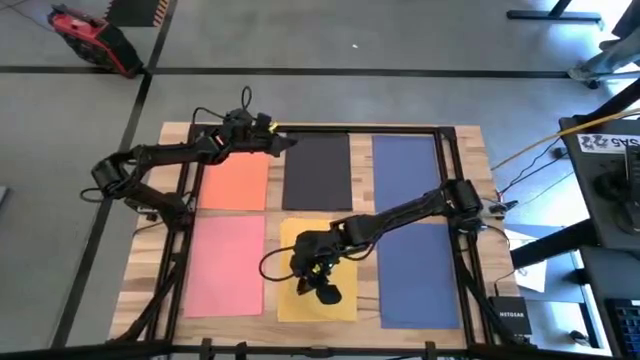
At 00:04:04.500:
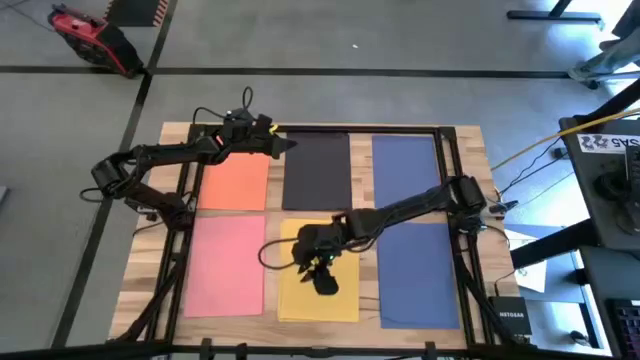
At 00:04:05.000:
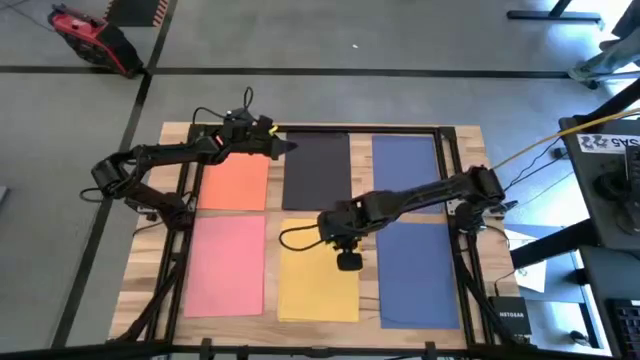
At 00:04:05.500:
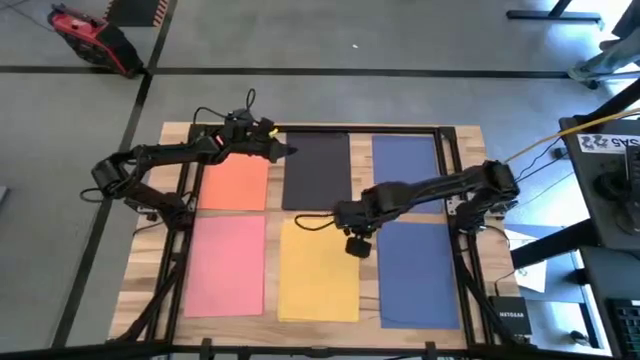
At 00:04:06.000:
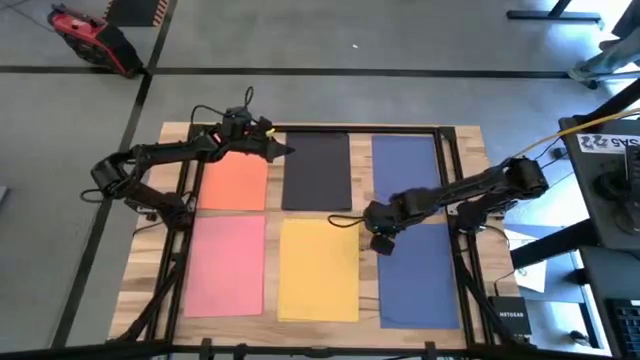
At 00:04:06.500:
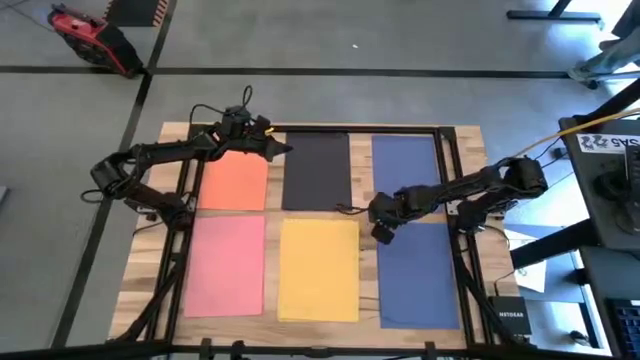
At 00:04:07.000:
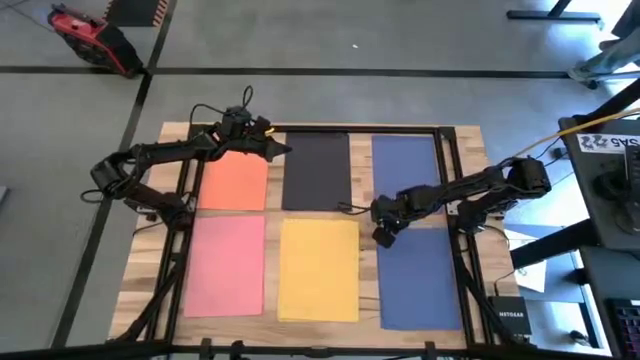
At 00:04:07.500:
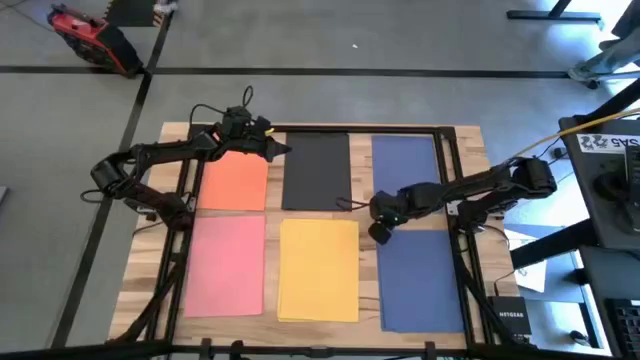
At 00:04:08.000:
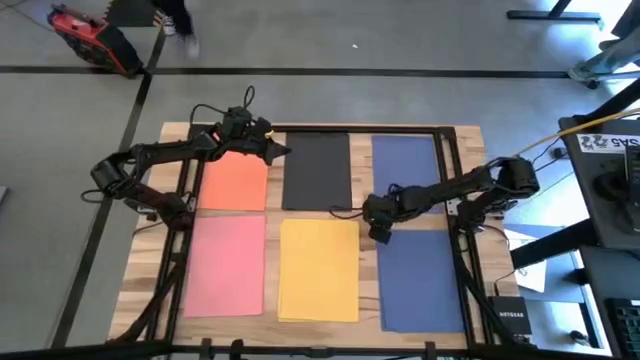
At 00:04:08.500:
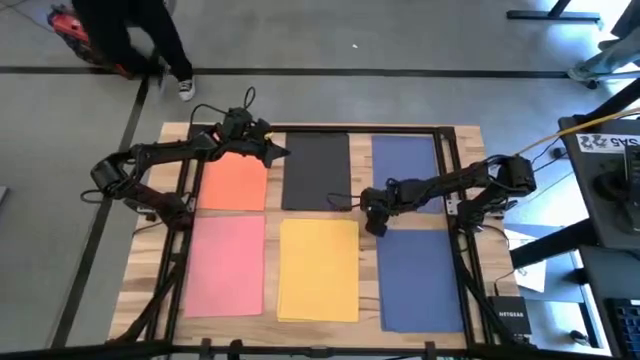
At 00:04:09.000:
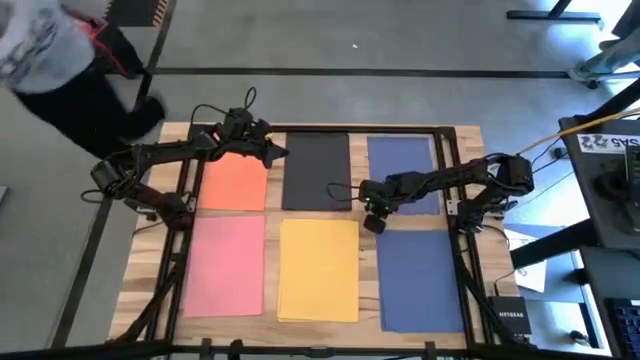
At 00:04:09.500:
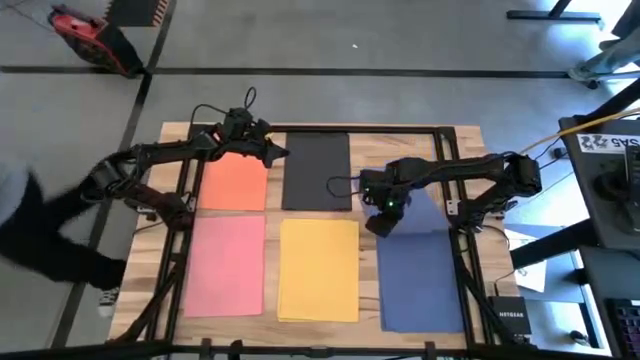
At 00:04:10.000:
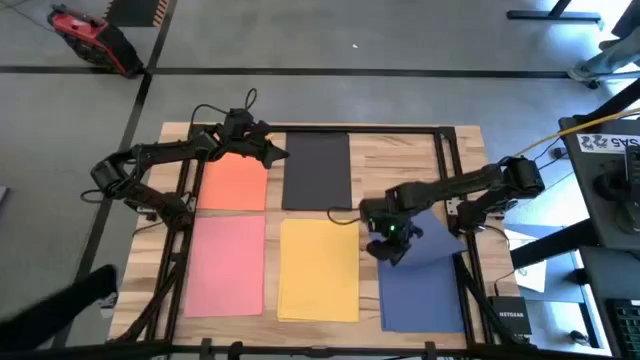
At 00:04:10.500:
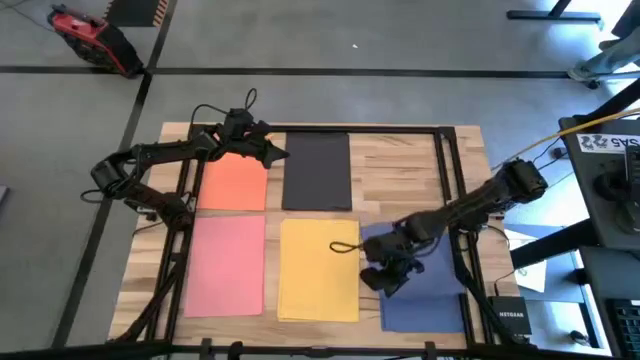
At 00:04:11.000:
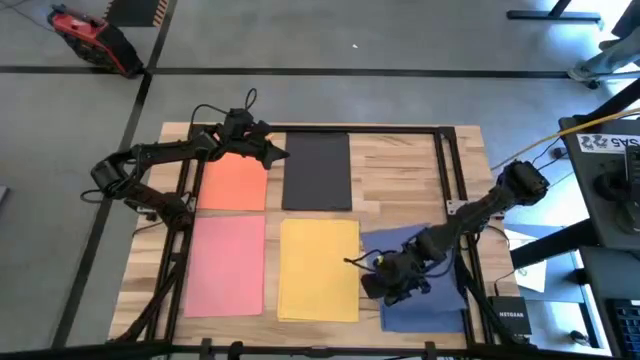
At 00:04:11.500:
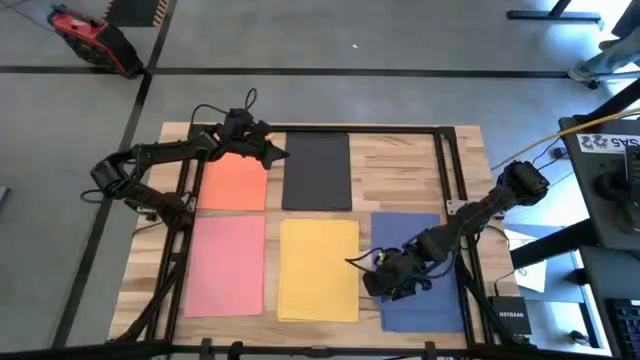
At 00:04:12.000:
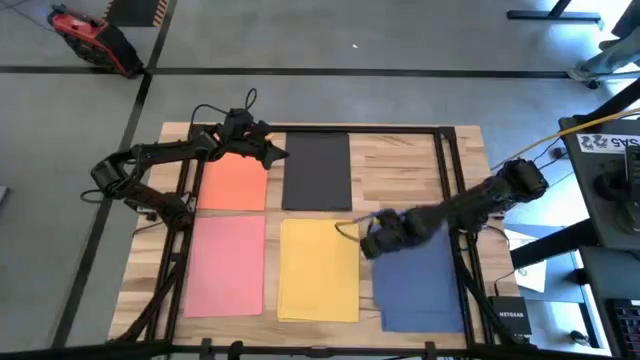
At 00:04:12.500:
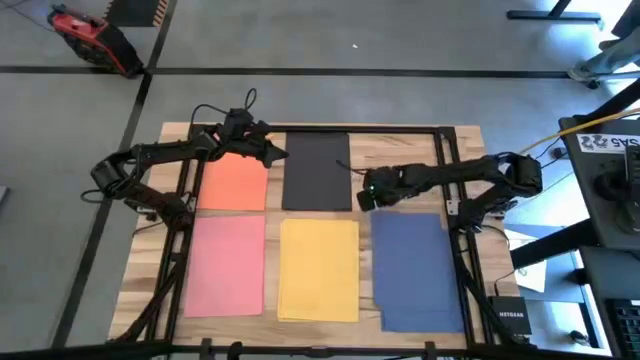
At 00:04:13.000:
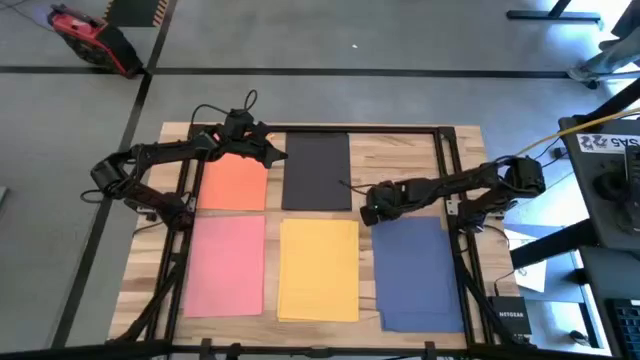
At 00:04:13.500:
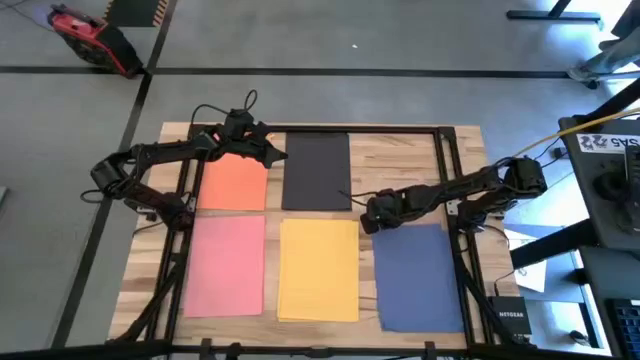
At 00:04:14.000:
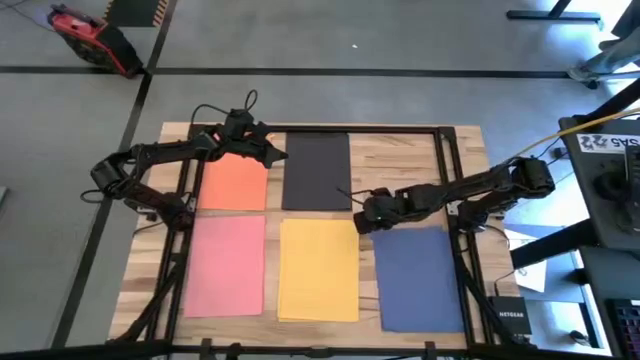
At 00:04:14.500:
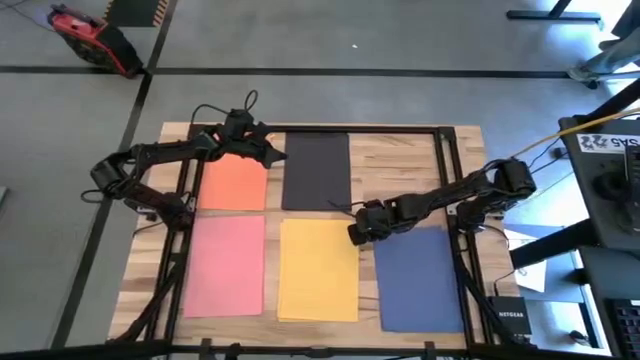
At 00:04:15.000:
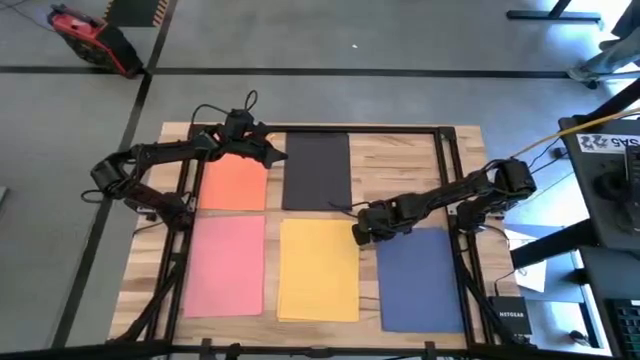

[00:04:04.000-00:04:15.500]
Task: Organize paper
Stack the blue color paper on top of the other blue color paper

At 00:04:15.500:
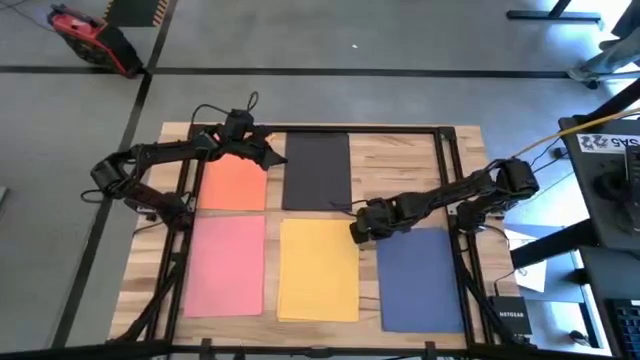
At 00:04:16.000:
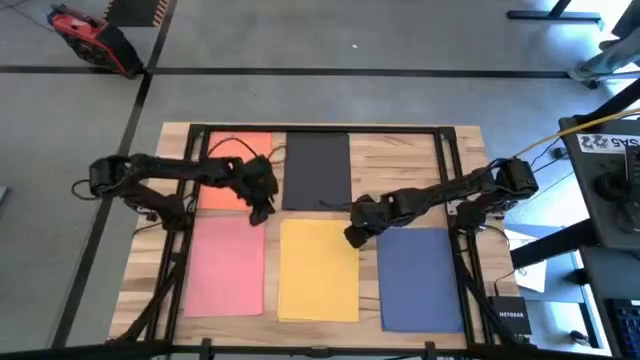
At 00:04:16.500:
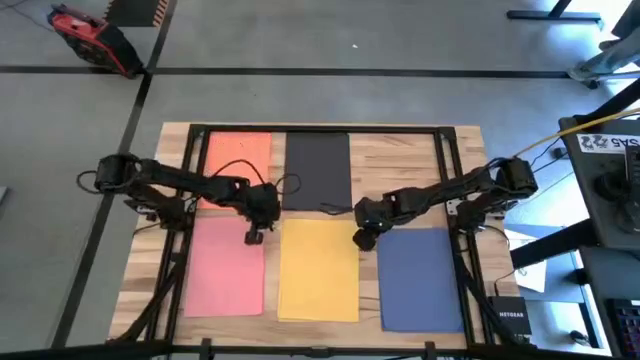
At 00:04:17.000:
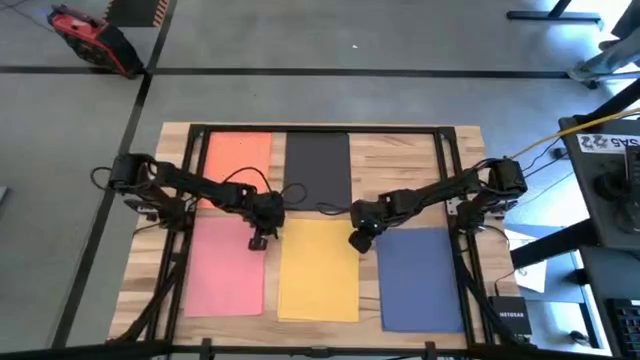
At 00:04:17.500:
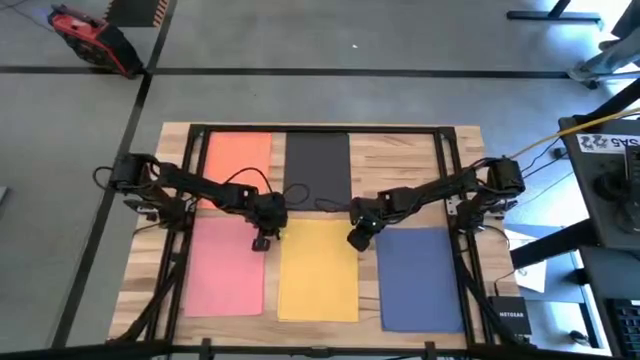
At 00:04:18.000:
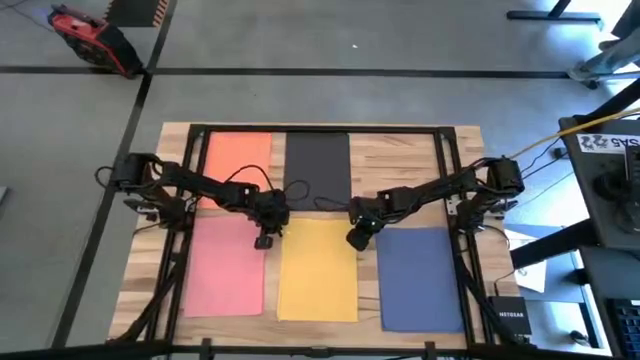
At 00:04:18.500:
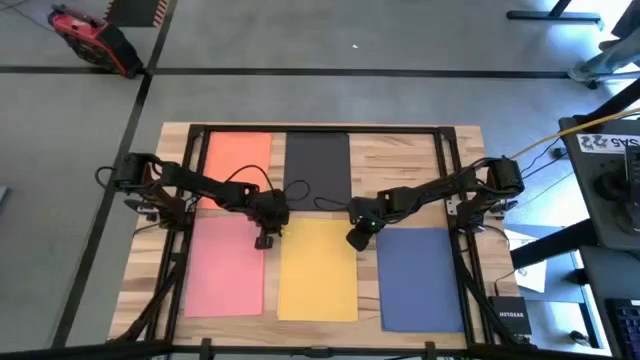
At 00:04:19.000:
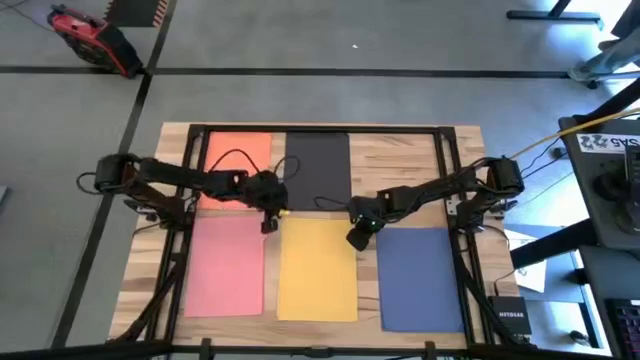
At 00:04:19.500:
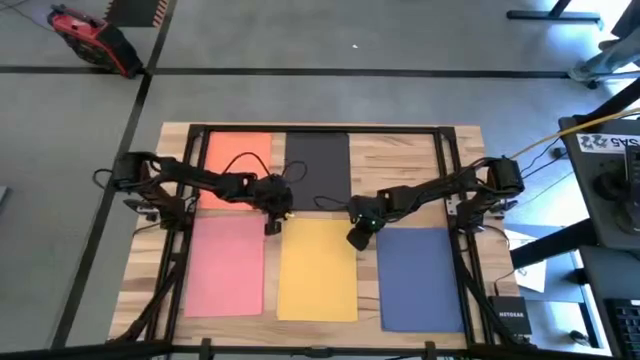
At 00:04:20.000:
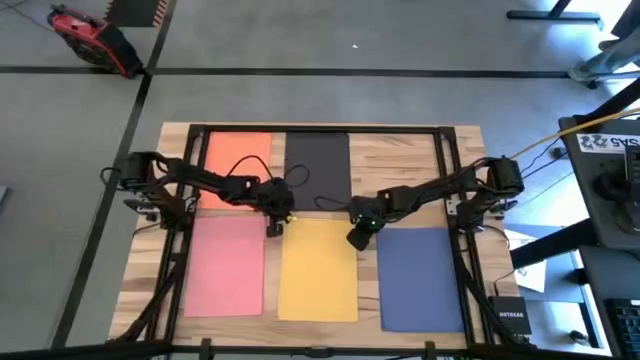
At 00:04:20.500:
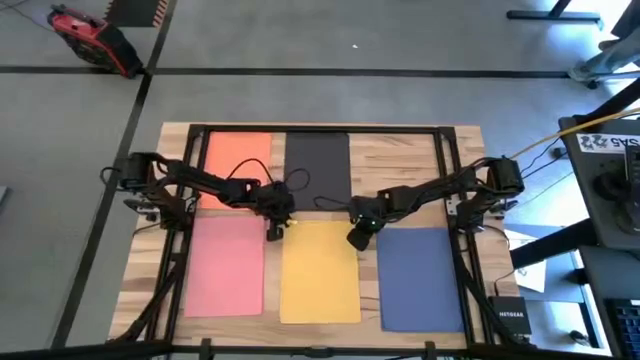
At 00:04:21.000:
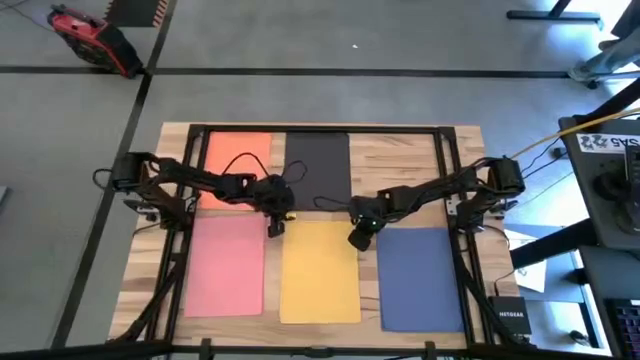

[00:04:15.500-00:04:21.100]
Adjust the stacked yellow color papers

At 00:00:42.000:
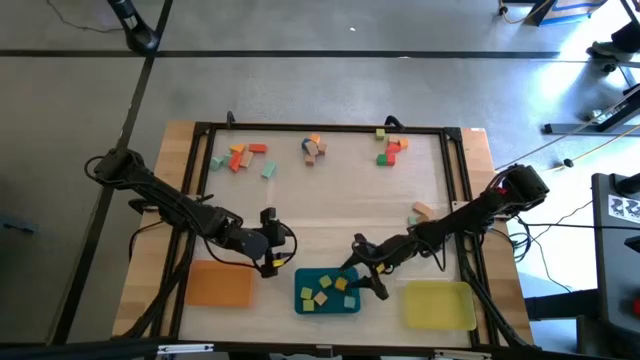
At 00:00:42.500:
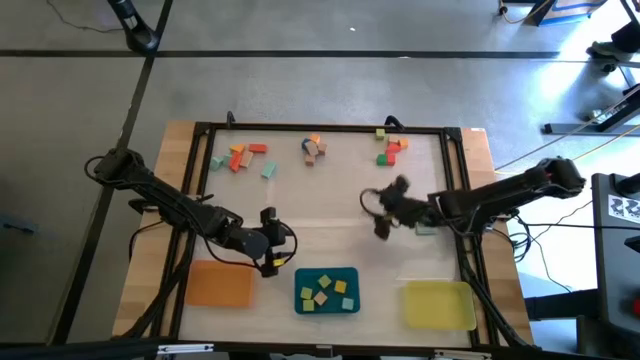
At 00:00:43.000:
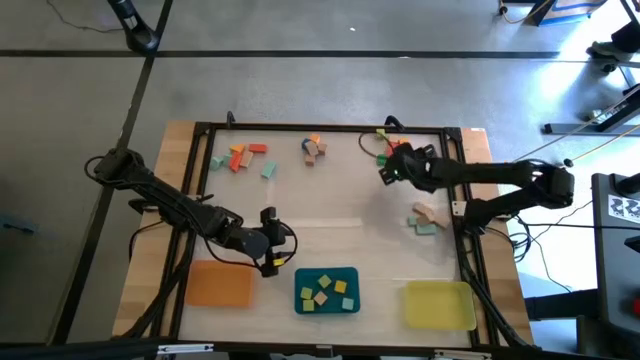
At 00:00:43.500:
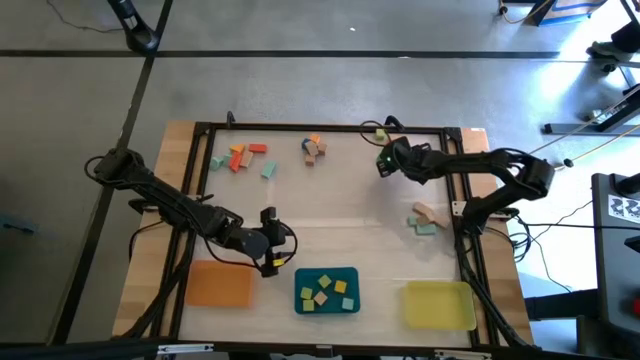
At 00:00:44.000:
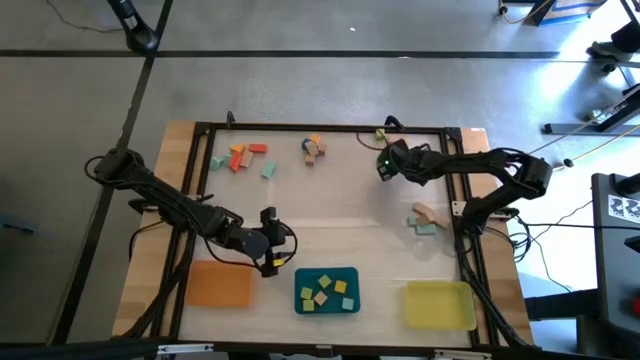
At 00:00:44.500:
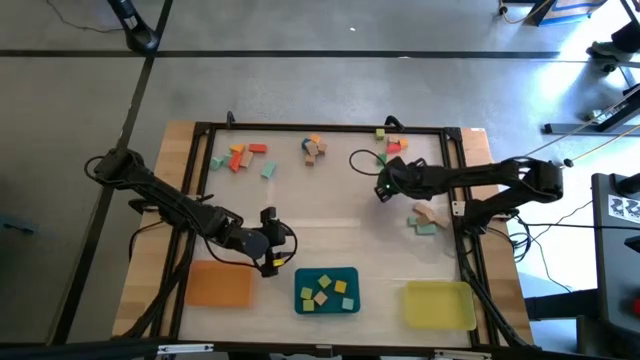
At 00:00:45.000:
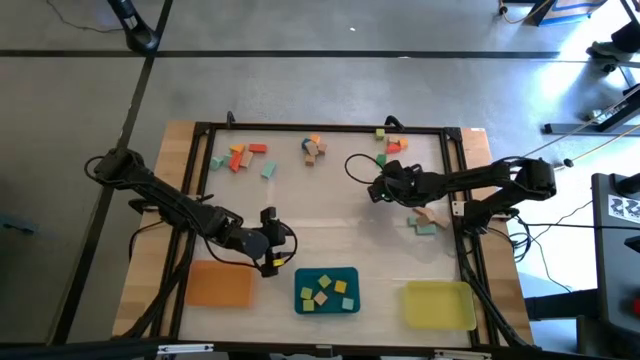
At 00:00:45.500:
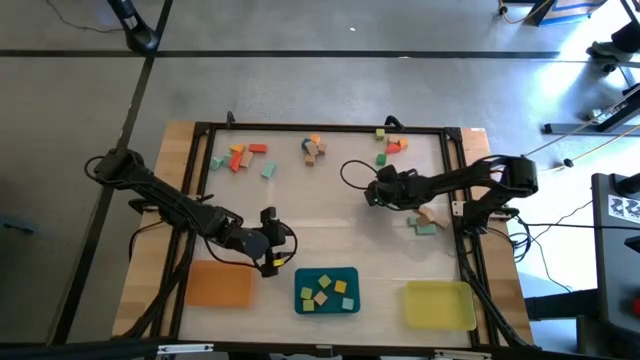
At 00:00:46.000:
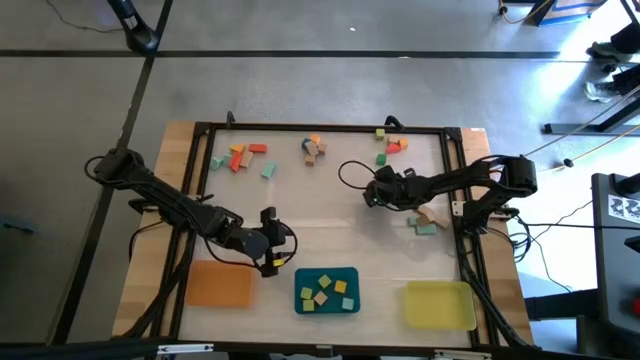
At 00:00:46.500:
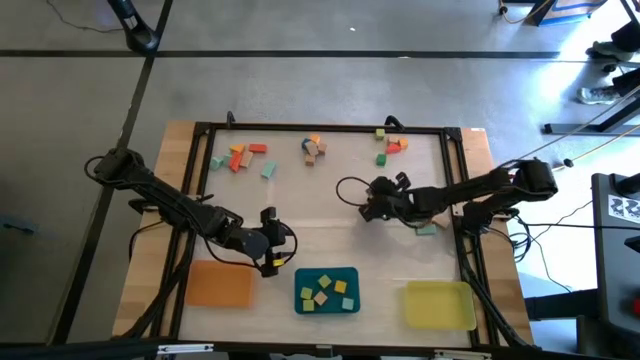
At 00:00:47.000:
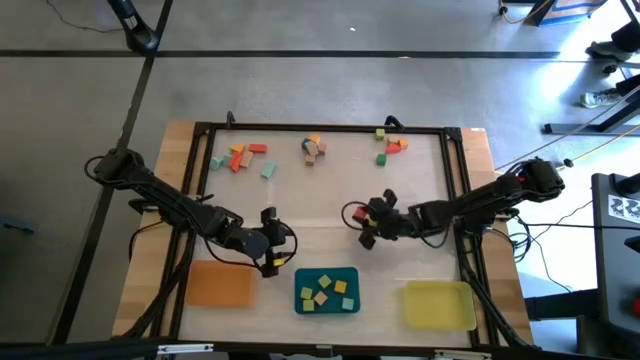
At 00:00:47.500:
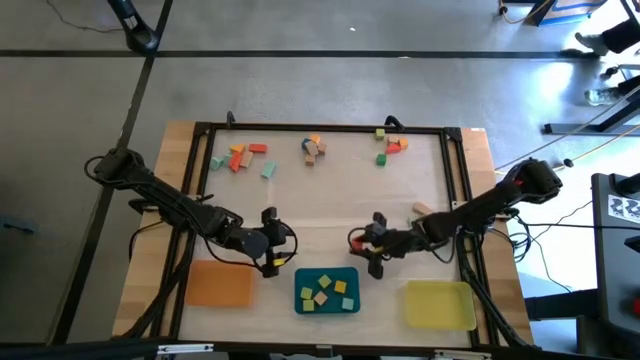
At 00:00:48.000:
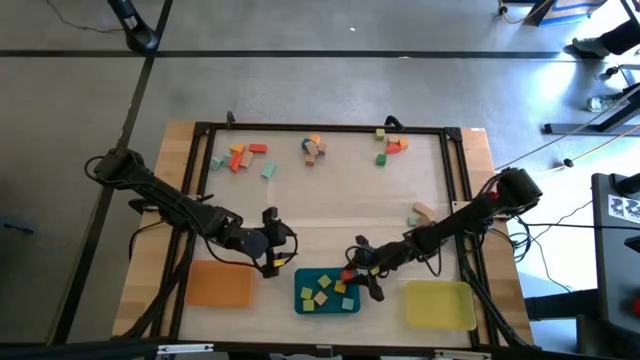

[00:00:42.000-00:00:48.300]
Task: Sort blocks by size
Put the orange cube block into the blue bin
